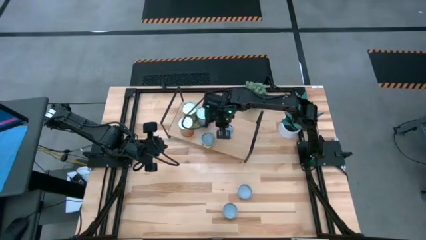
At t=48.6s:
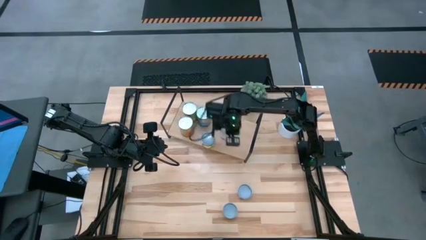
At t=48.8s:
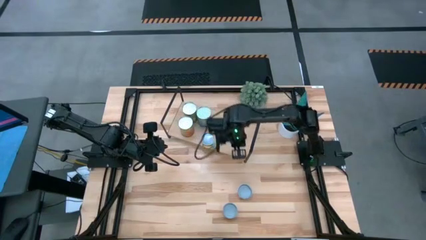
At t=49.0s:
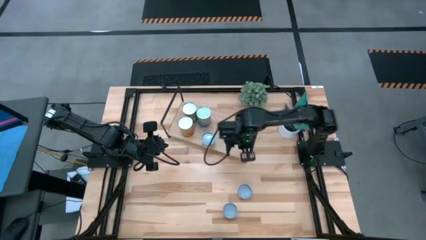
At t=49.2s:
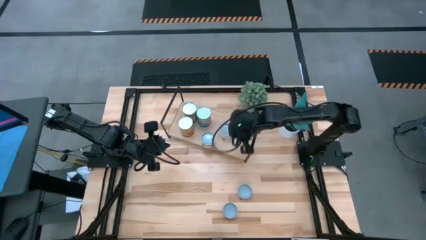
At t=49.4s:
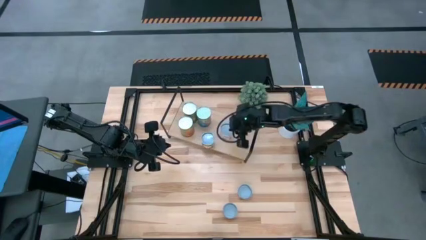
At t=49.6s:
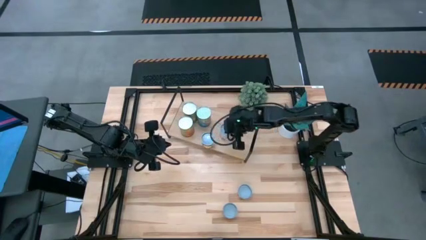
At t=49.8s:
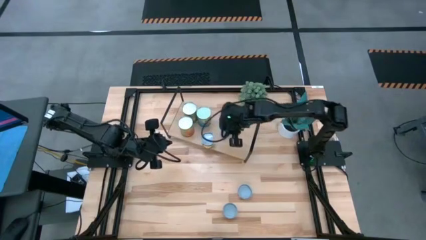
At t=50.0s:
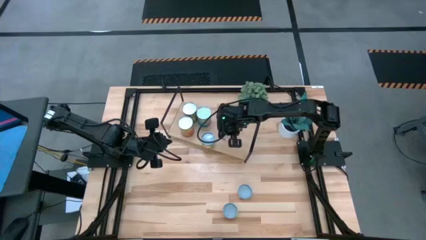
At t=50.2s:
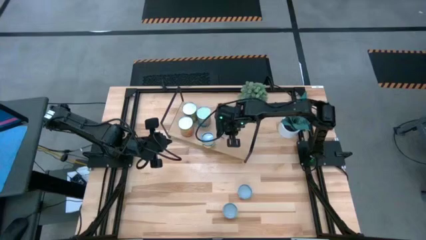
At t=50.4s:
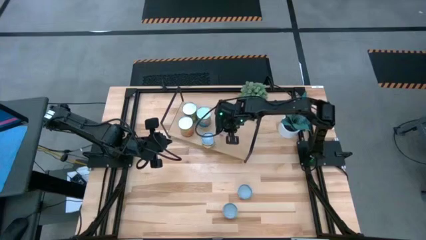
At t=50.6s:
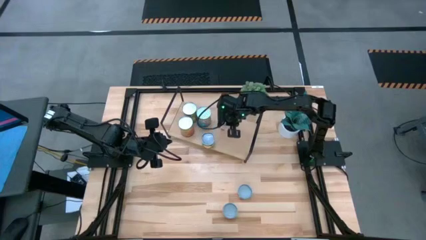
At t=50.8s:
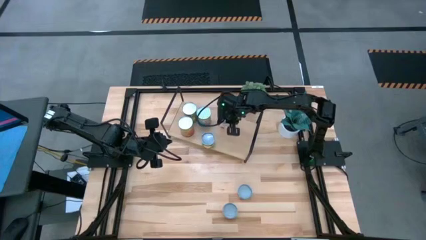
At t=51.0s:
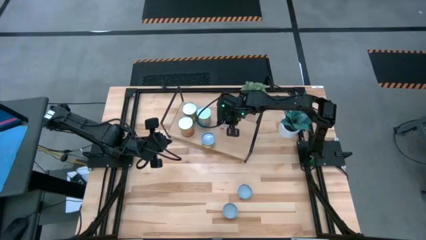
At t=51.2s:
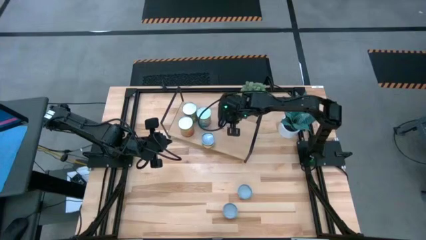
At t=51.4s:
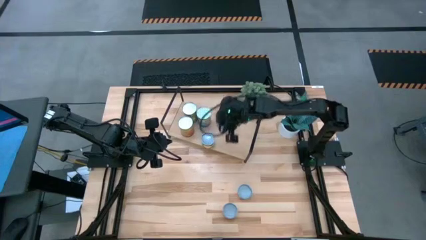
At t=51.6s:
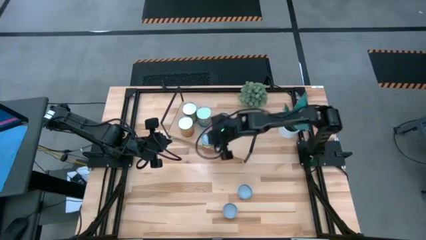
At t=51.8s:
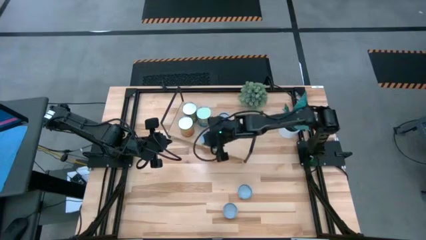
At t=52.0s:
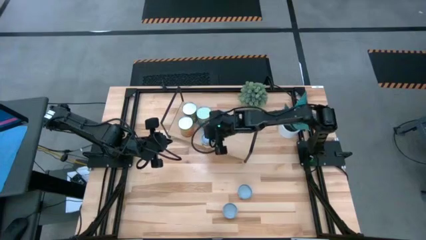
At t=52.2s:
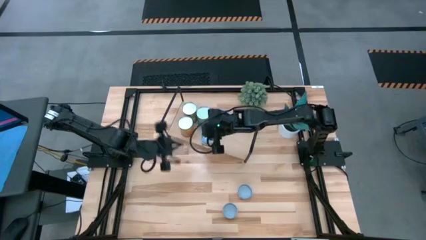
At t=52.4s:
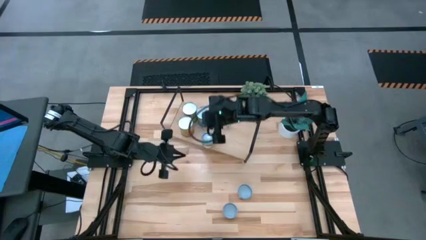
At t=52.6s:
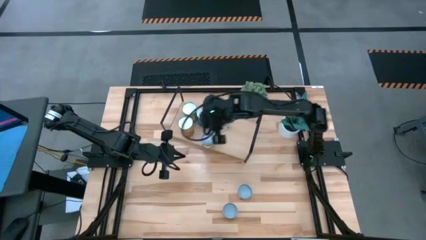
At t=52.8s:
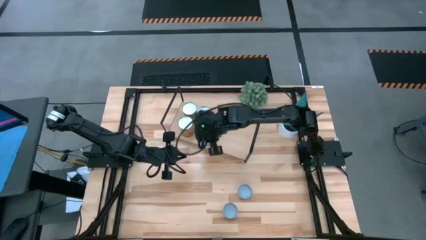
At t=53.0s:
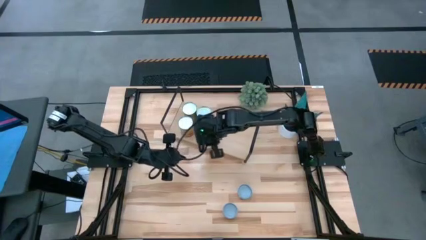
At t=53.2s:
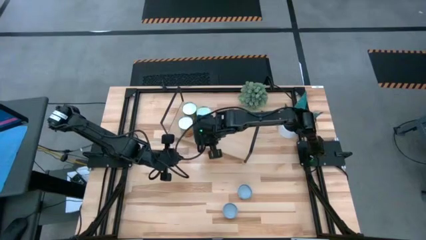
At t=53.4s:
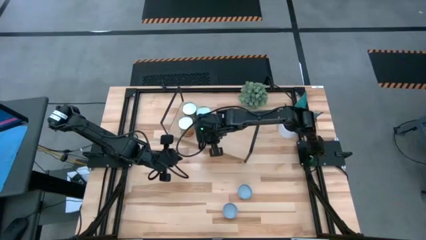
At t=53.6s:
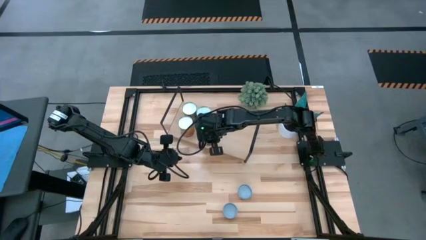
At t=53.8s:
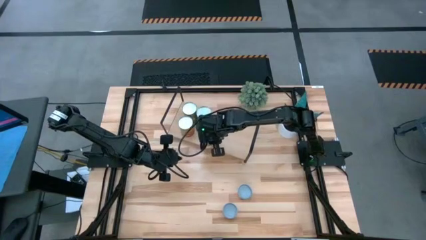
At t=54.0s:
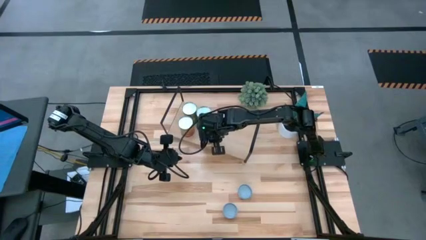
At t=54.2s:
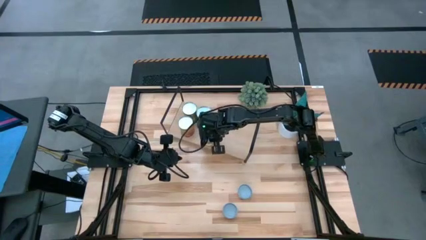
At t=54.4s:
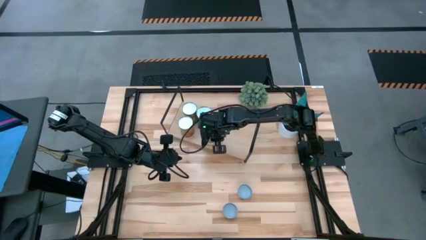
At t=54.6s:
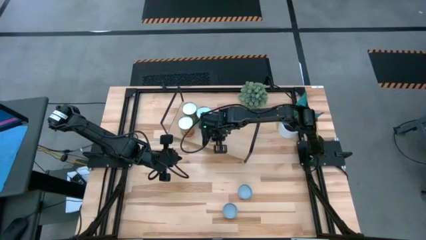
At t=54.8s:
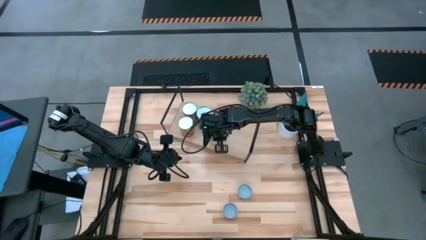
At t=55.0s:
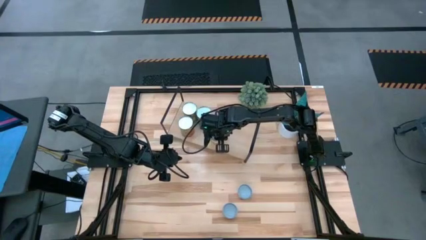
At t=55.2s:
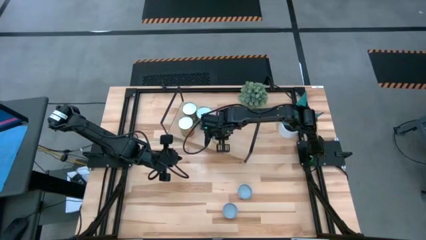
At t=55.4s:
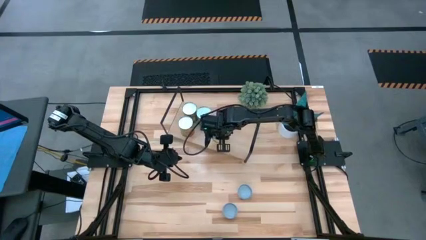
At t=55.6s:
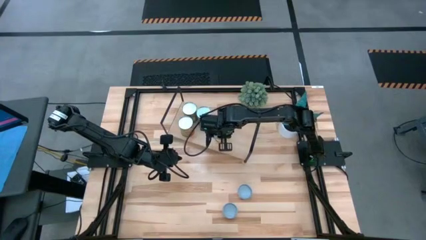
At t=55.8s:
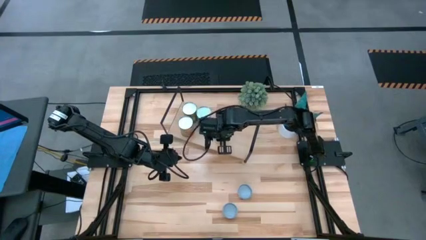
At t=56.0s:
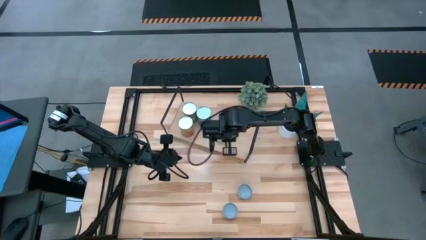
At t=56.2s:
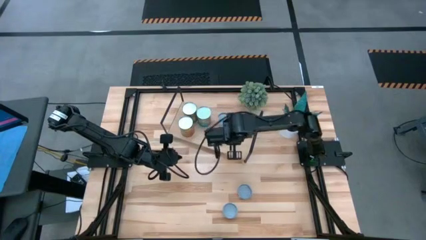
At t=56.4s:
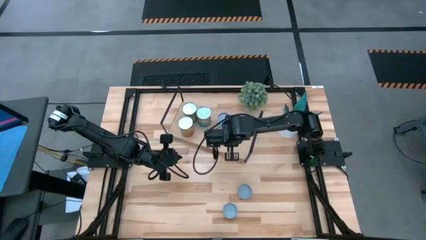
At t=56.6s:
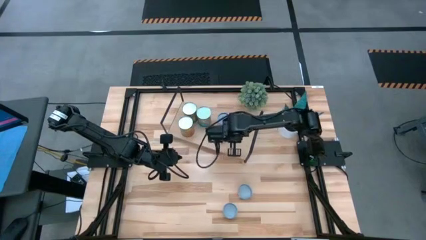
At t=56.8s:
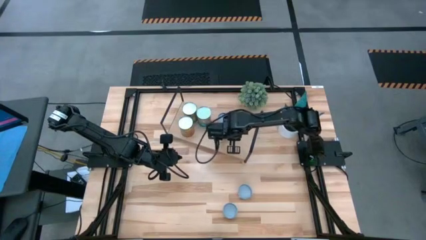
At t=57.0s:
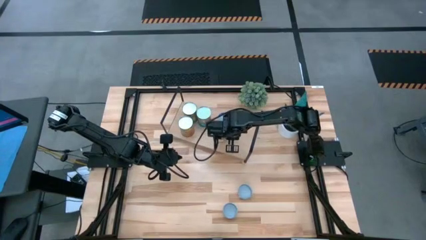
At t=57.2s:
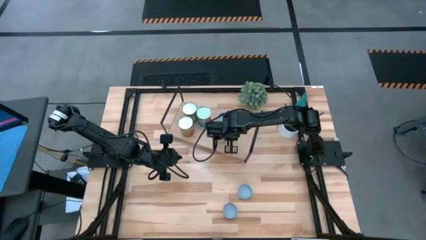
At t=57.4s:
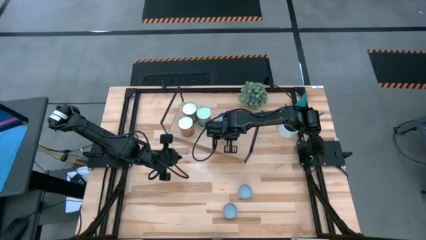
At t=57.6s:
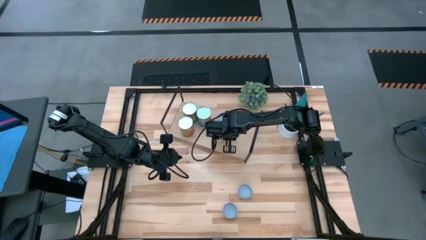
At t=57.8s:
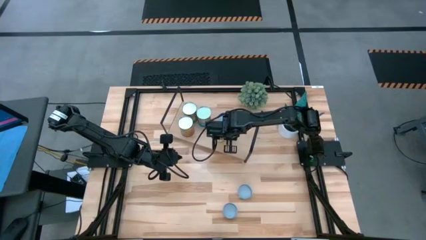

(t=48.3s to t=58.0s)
Task: Pick and place cans onto a shelf
Adjust the cans on the shelf

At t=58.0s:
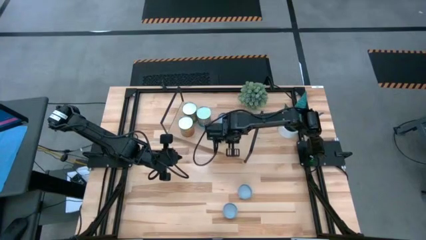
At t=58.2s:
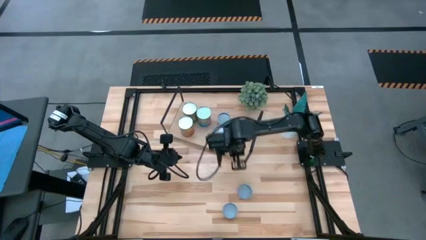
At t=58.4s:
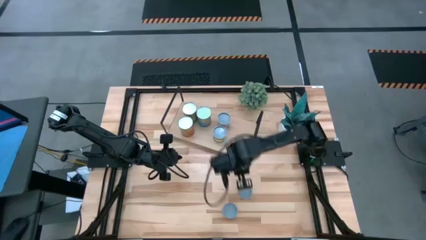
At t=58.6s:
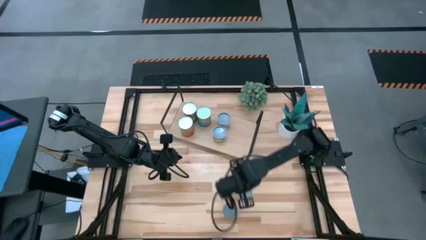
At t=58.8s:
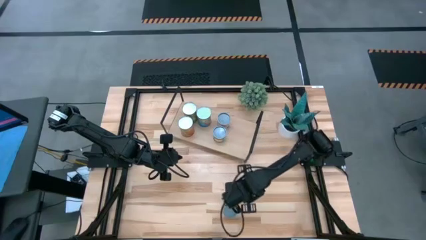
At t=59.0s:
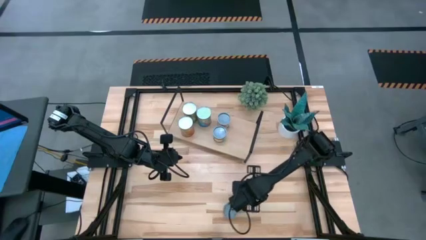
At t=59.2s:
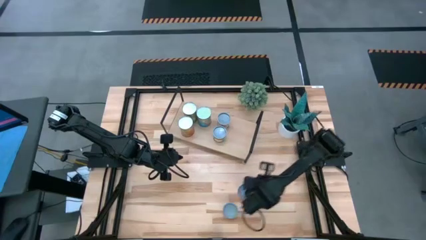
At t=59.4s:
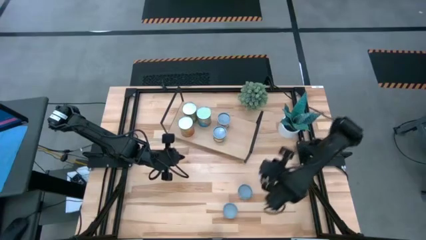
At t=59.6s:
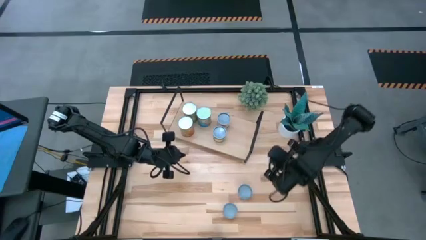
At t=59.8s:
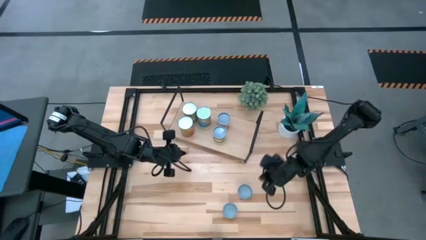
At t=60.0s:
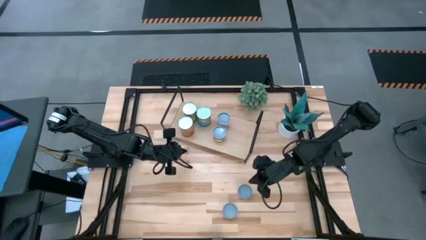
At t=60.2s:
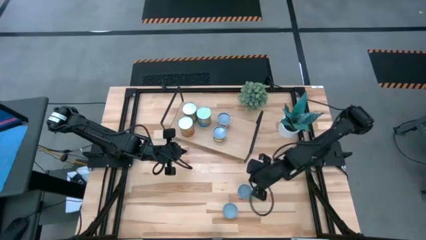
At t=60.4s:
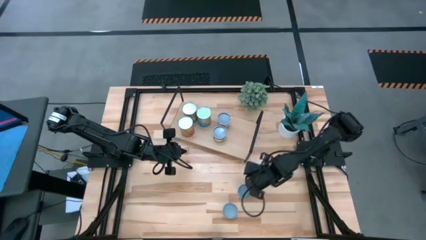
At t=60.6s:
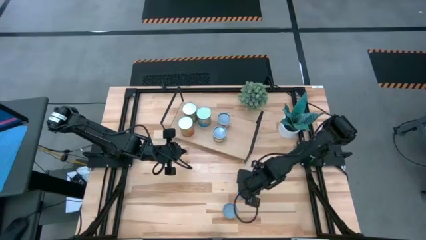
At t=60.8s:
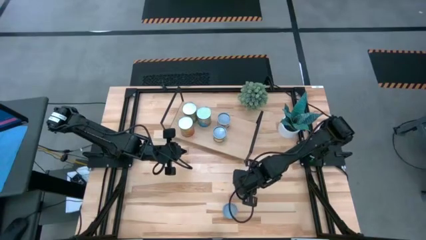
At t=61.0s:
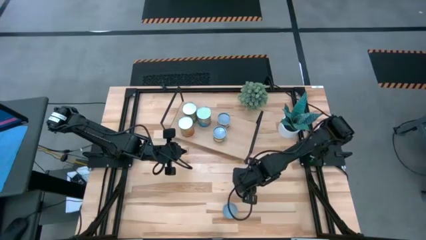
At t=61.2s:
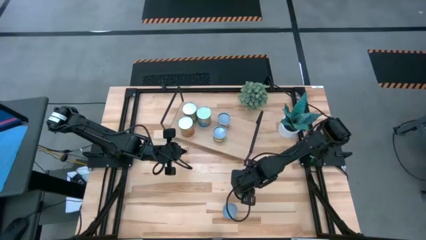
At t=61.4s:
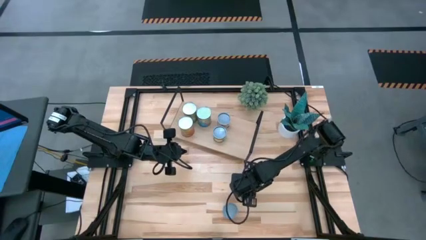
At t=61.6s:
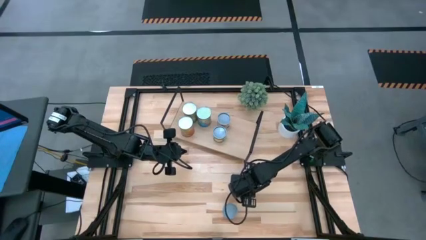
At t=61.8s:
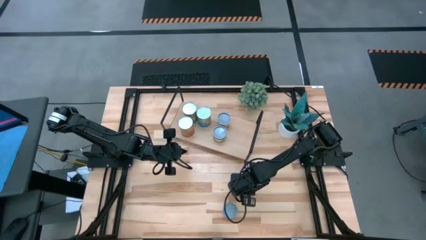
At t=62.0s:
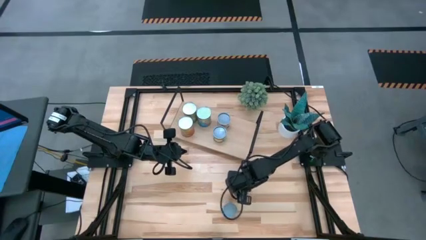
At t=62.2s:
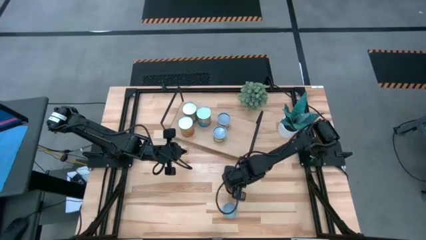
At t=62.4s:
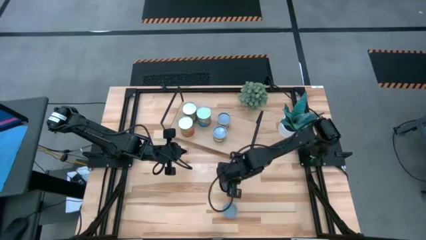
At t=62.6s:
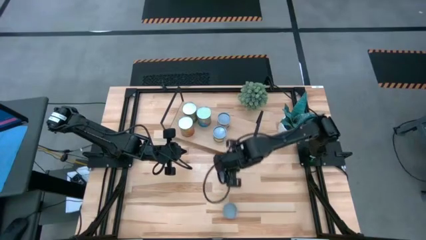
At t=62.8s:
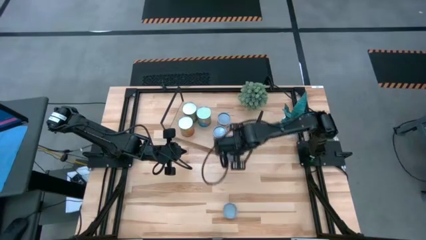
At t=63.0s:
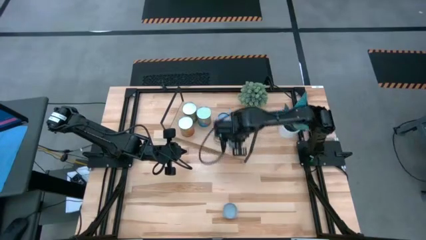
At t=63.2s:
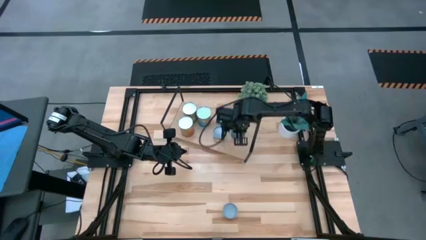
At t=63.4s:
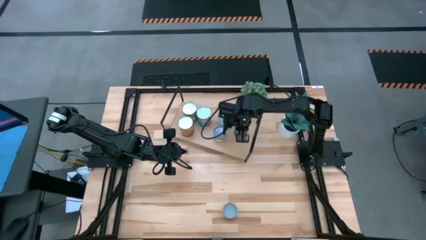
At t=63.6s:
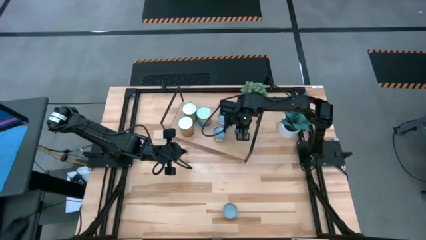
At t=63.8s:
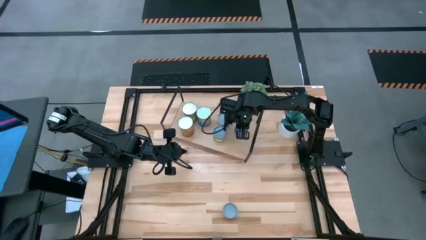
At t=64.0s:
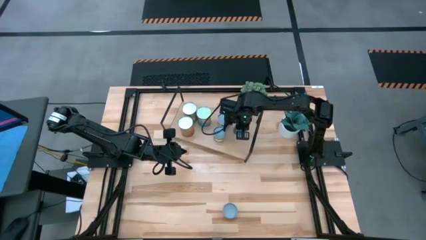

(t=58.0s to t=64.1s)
Put the canned salmon on the shelf
